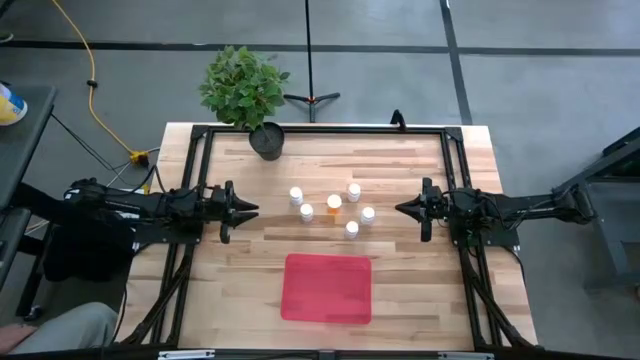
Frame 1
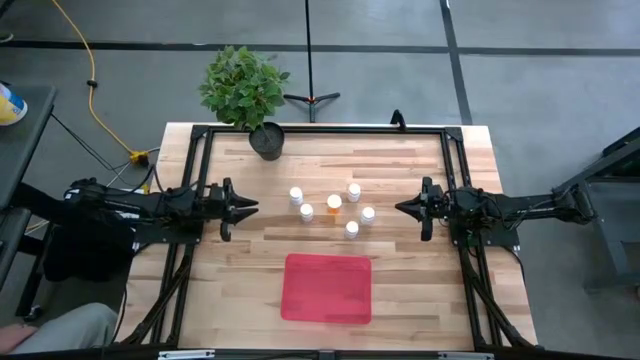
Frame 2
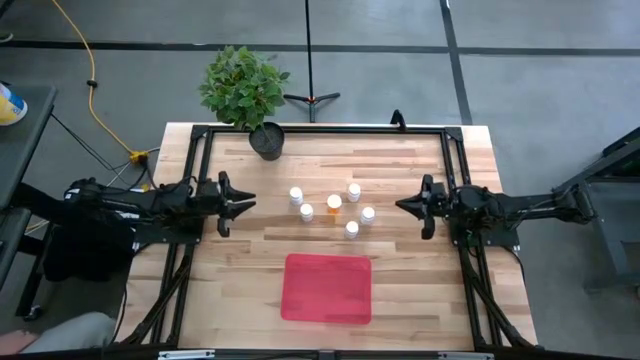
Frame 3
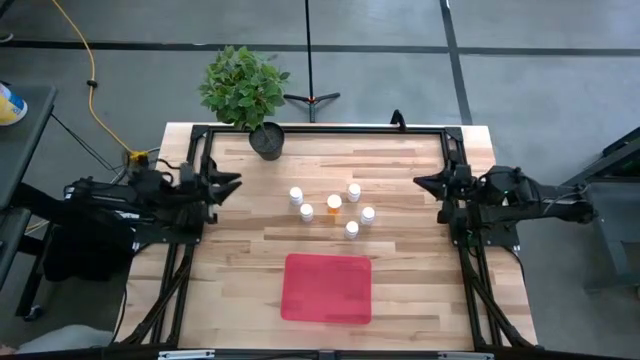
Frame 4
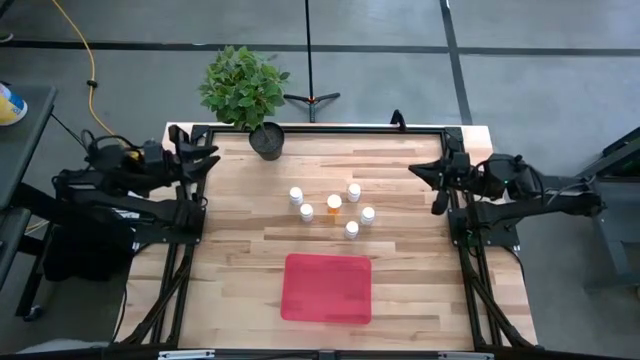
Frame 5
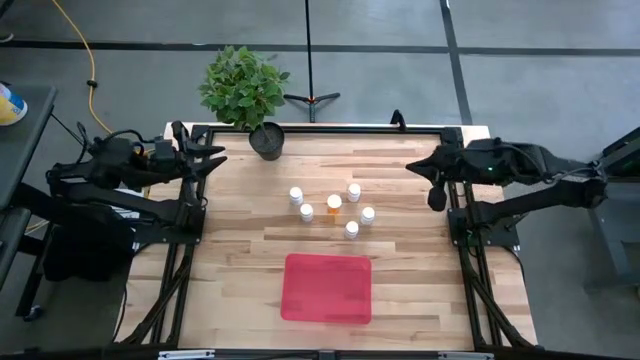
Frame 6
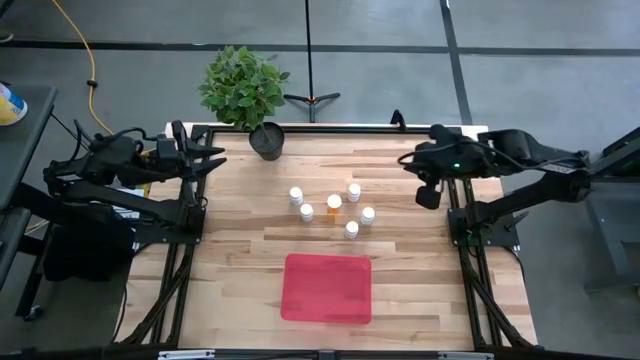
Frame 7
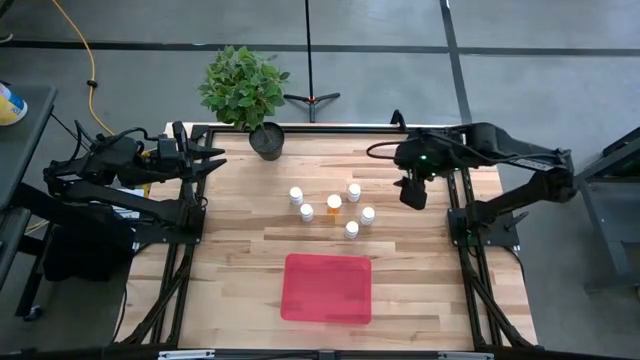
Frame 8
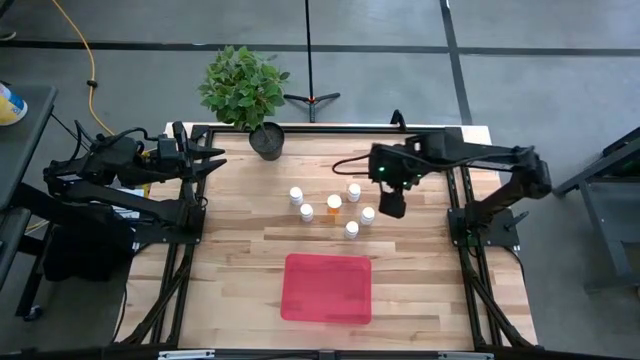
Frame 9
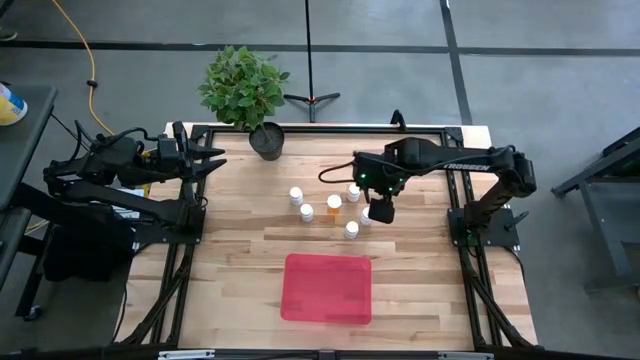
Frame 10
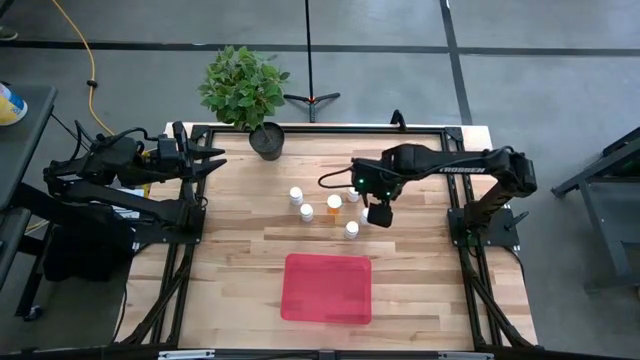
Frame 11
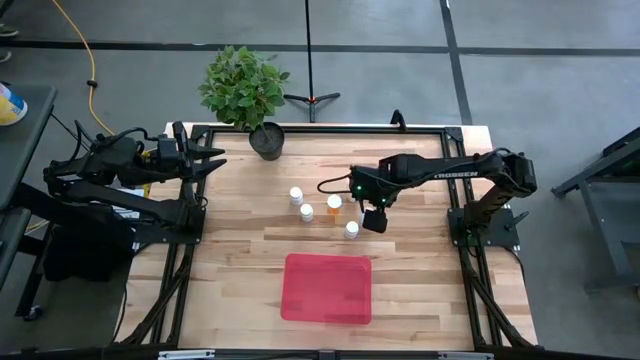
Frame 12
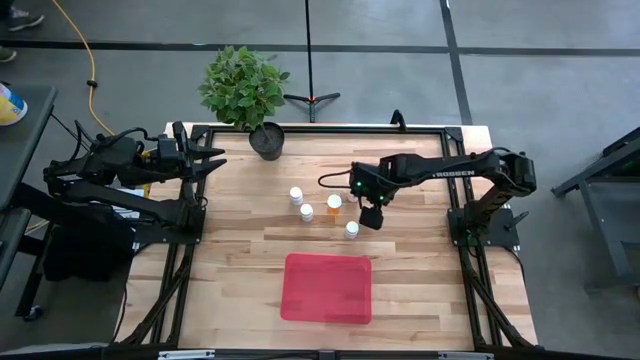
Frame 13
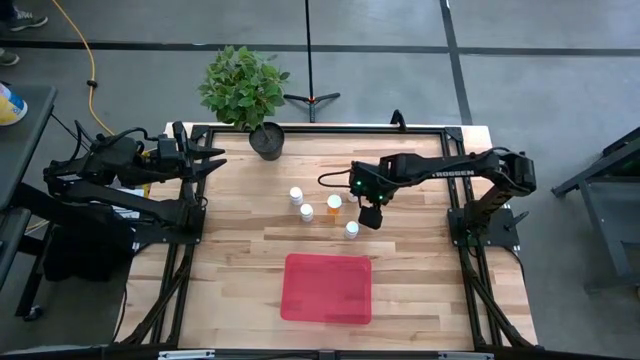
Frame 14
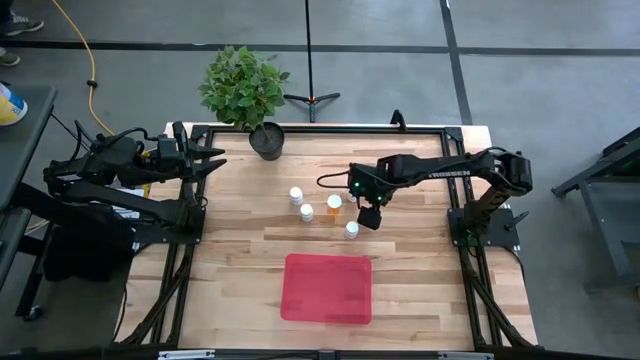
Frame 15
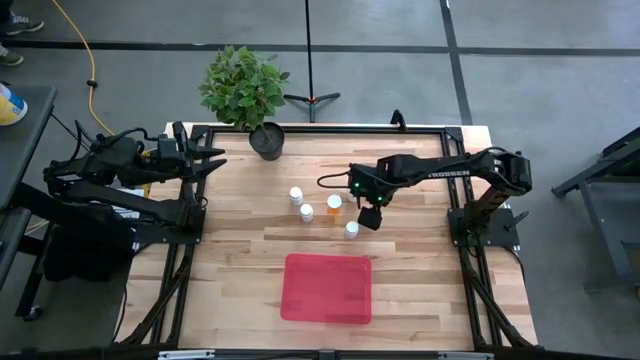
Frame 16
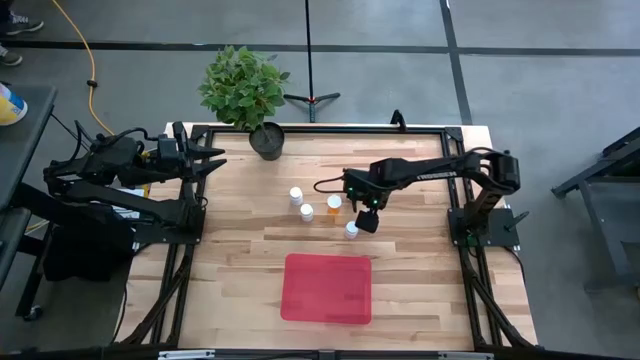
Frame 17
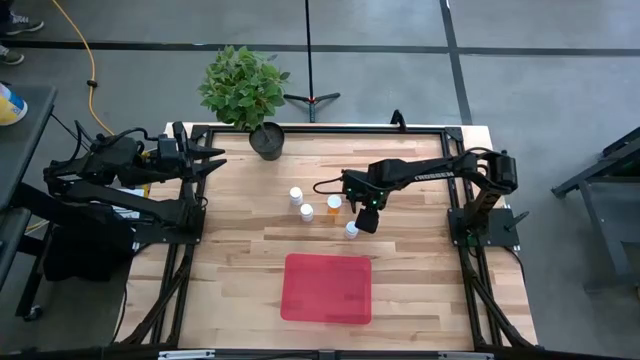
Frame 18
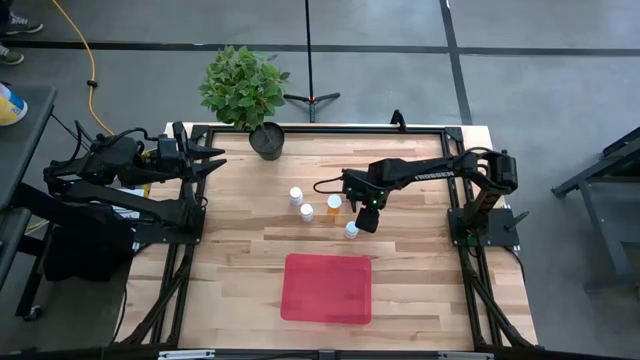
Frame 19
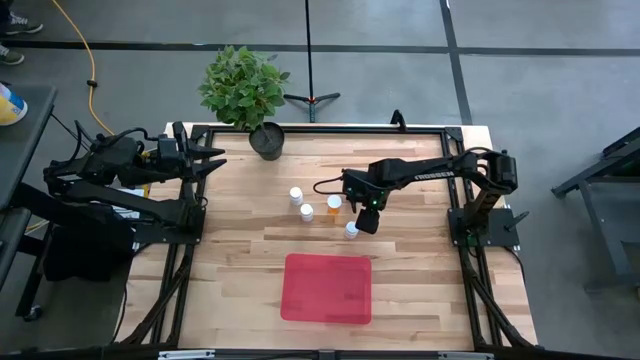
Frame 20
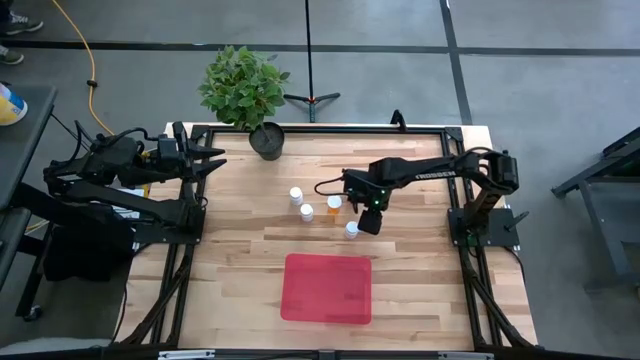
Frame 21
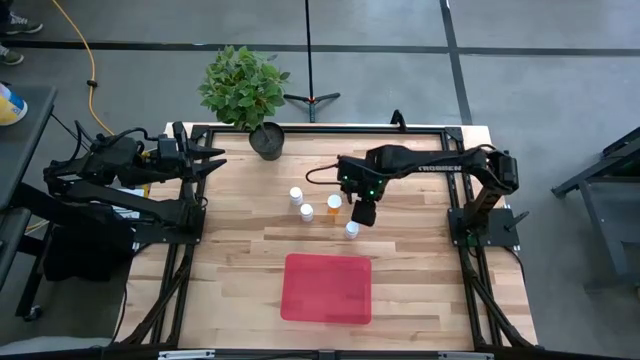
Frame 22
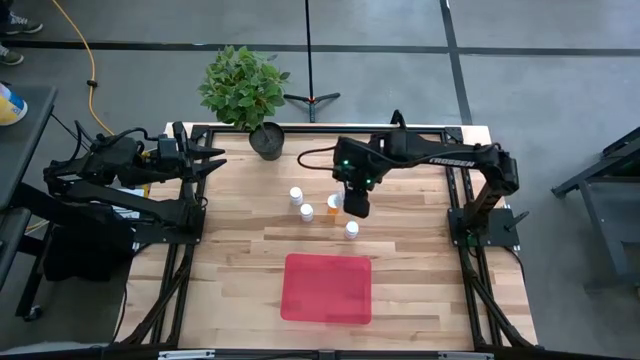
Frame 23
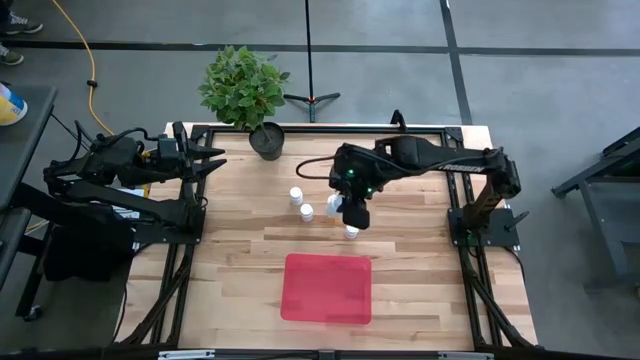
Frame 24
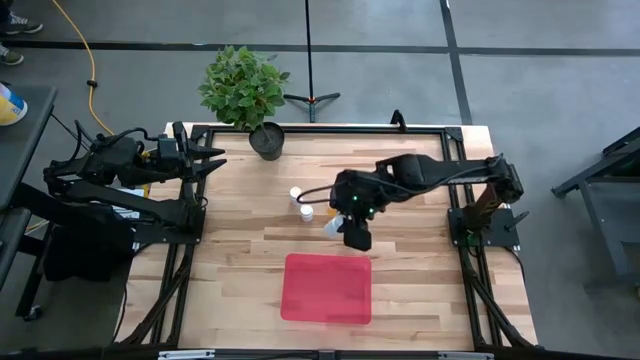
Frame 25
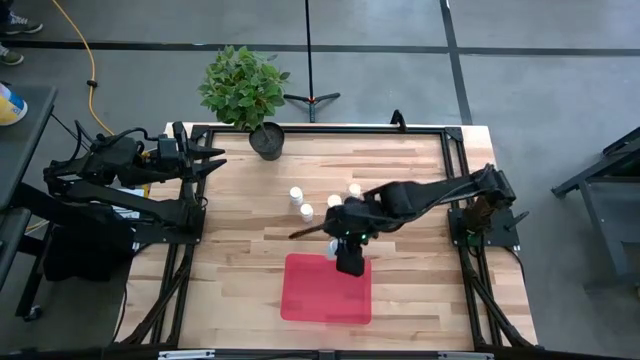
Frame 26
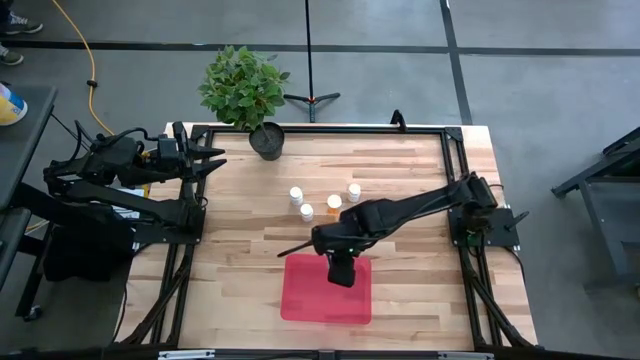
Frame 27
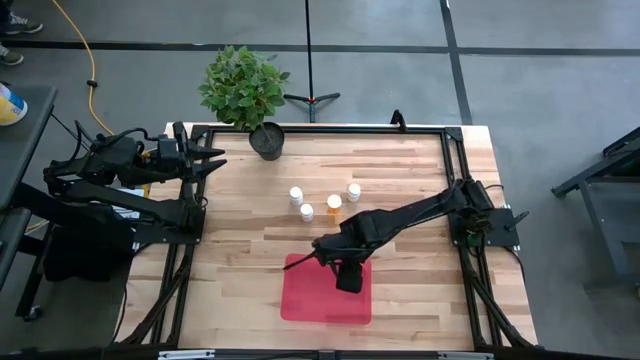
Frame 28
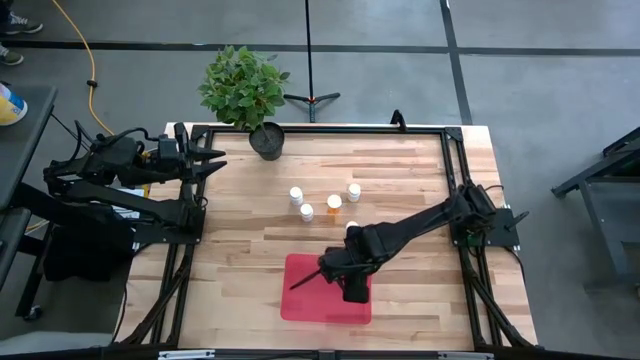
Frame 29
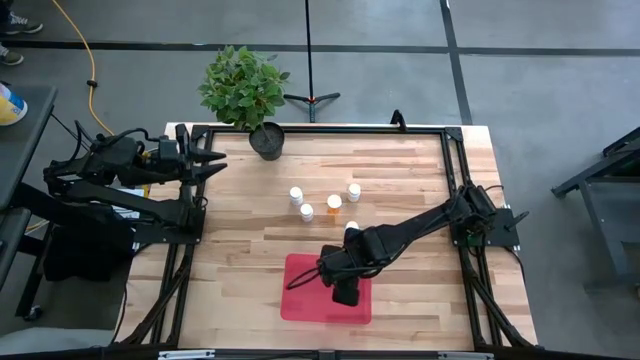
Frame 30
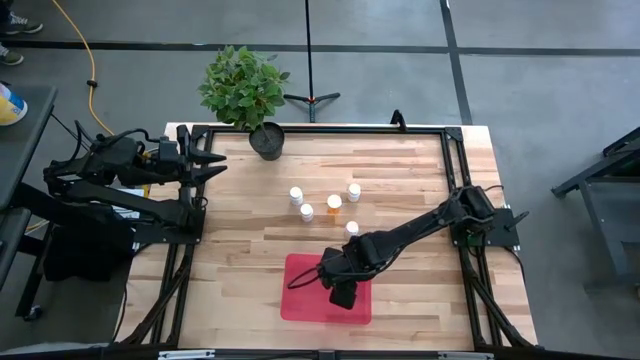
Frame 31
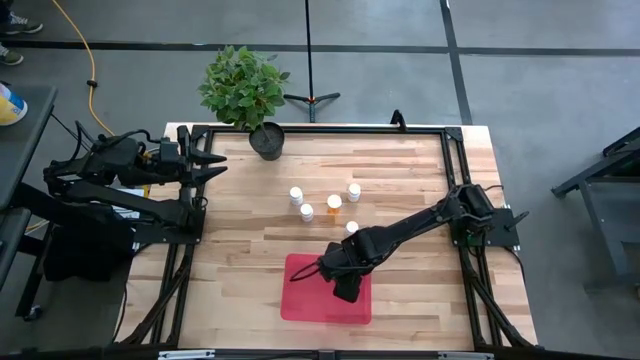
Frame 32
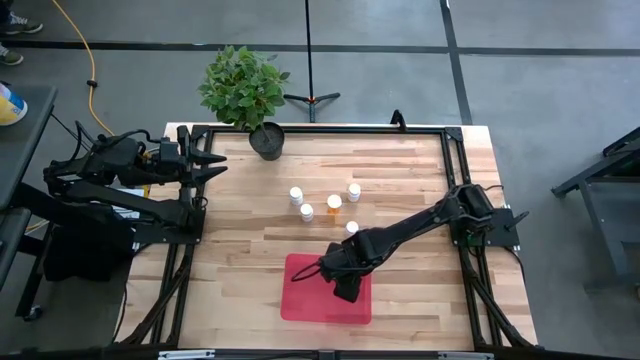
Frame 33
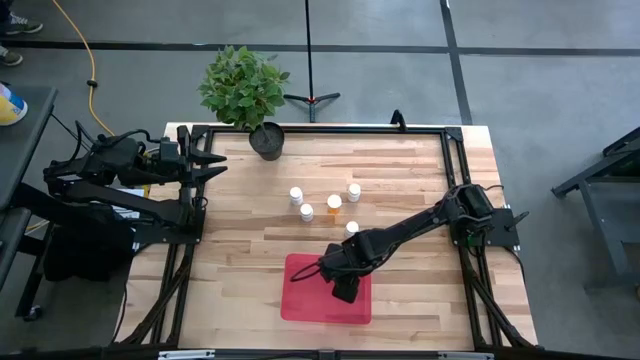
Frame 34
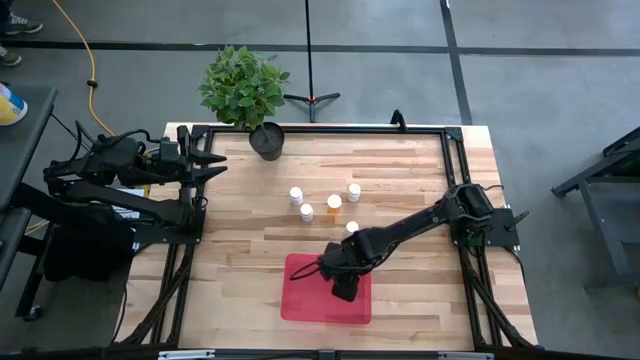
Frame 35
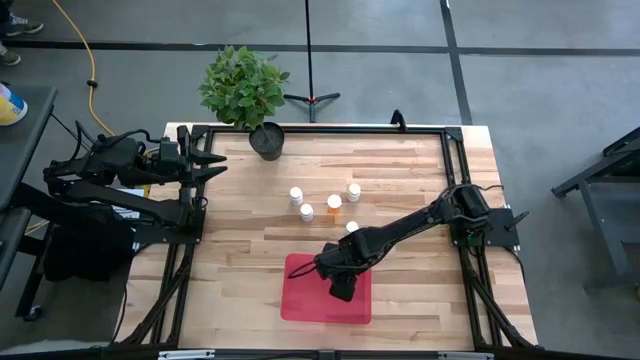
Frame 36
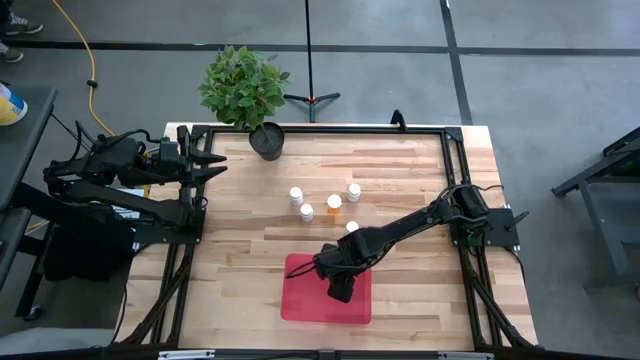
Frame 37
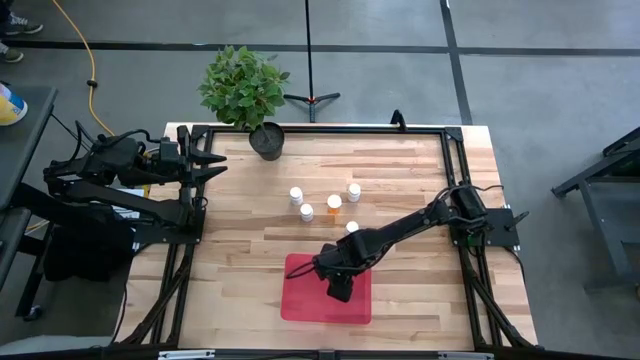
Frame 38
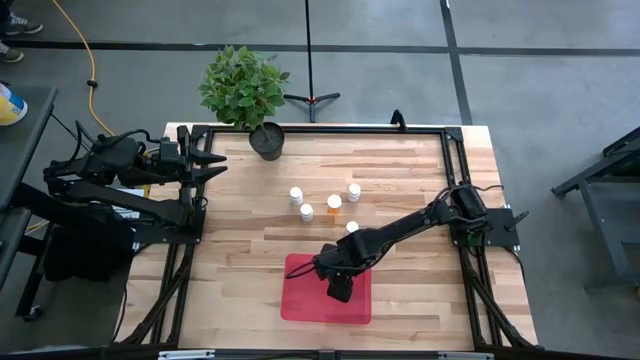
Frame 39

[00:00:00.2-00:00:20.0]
Task: Pick and place pill bottles into a basket
Put the white pill bottle into the red bin
